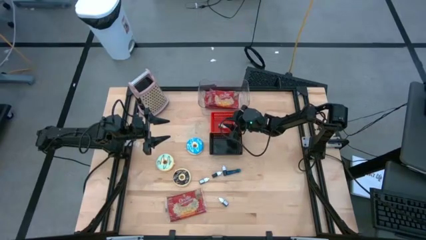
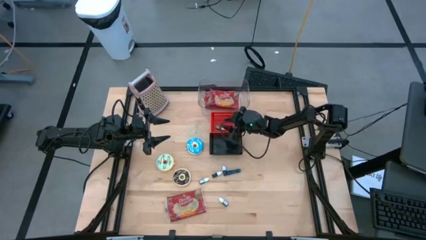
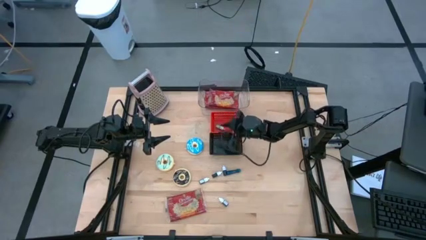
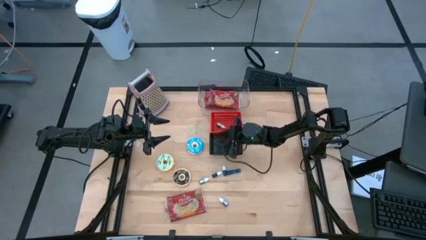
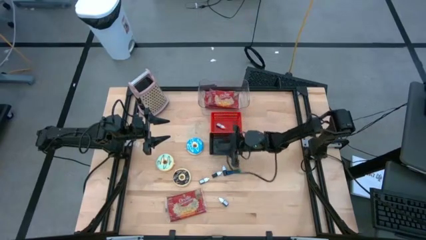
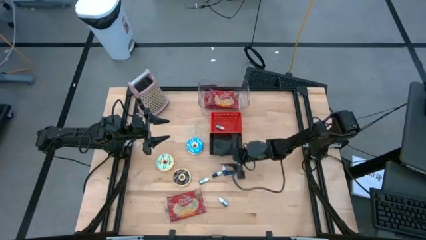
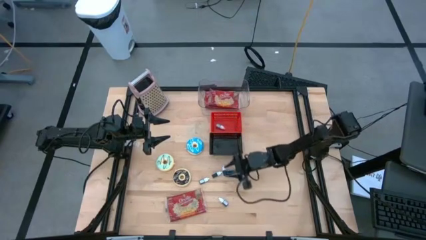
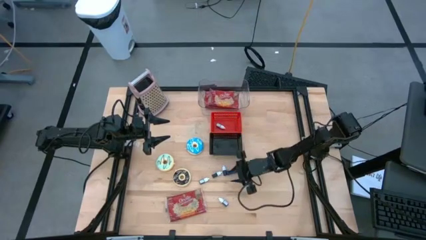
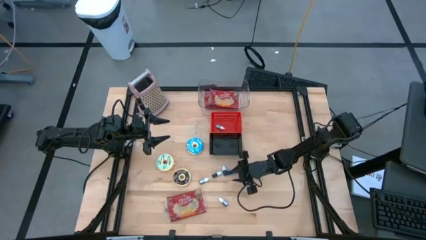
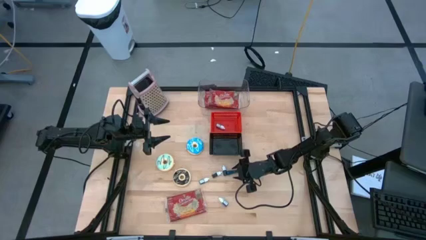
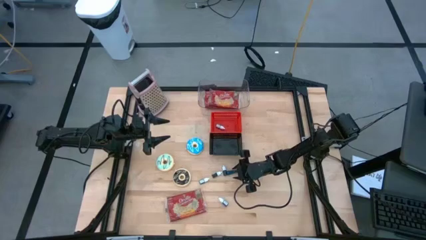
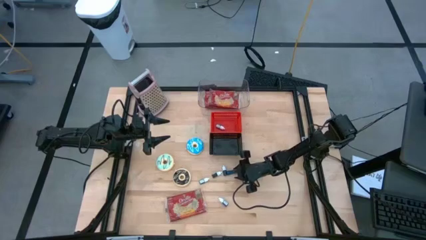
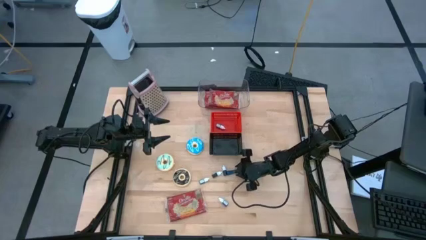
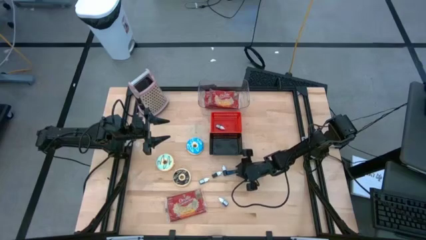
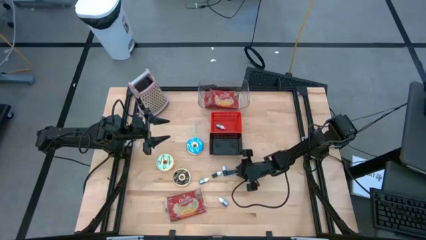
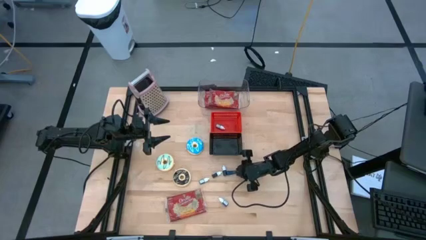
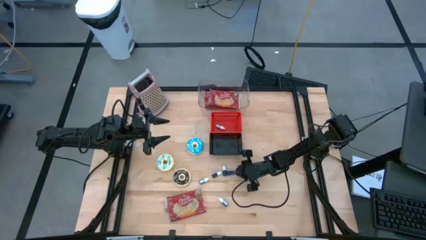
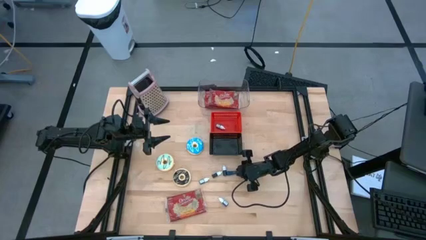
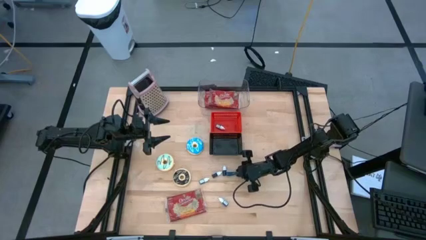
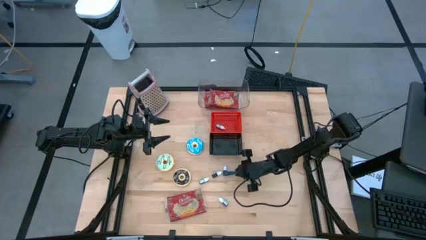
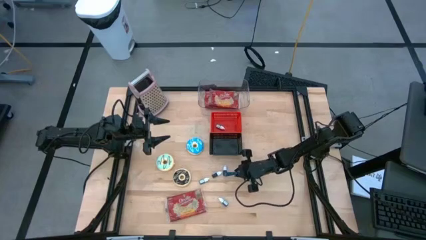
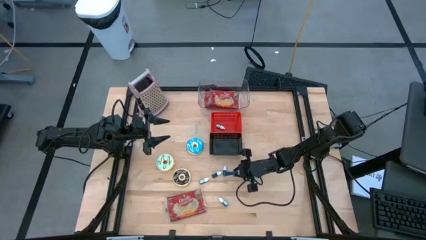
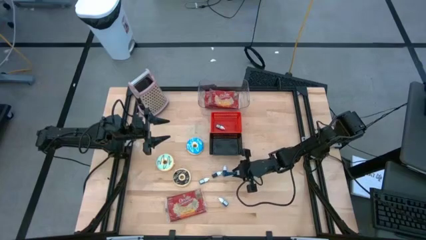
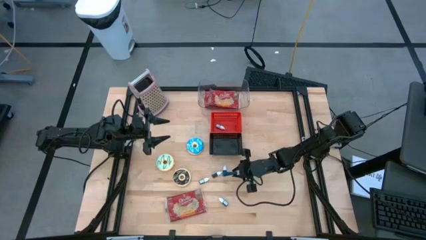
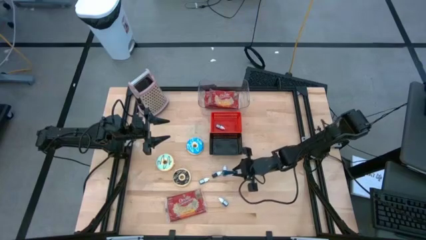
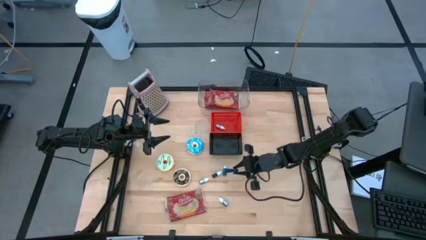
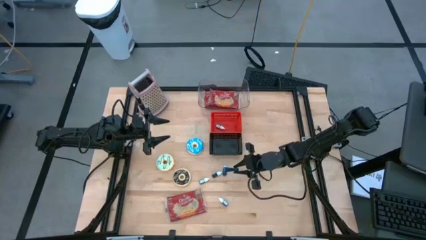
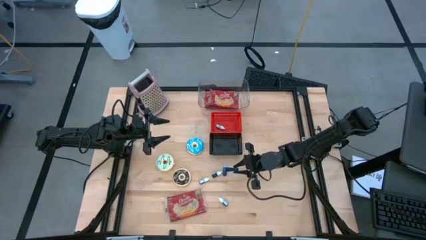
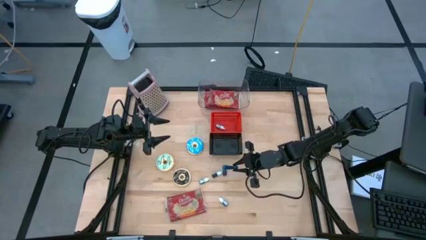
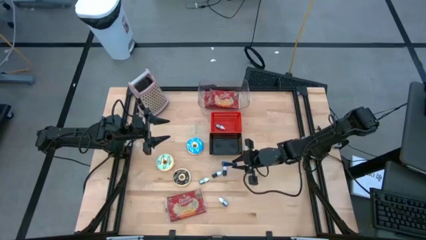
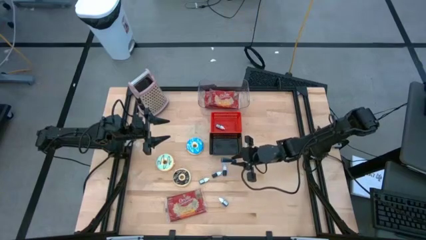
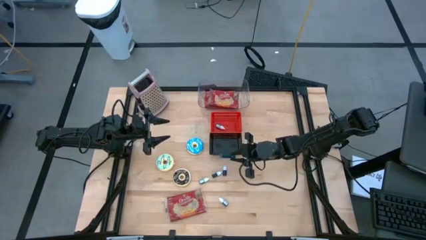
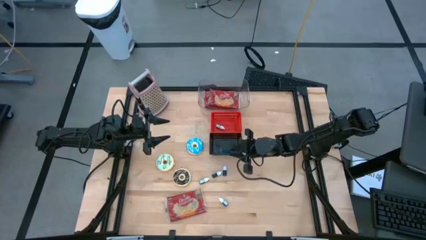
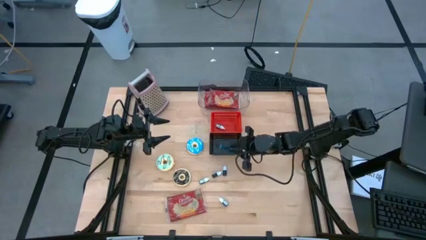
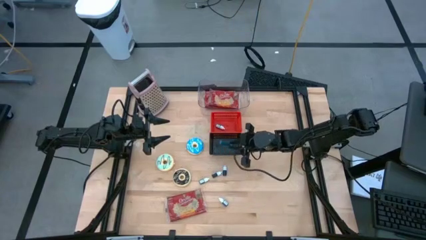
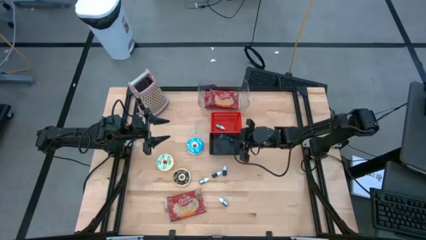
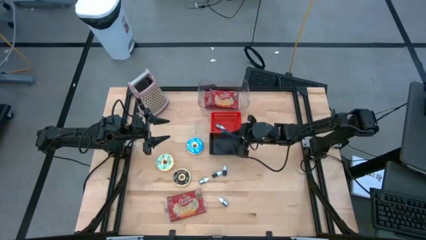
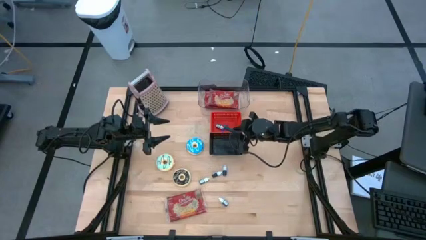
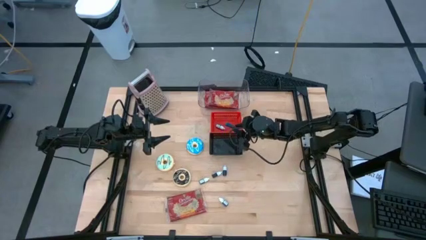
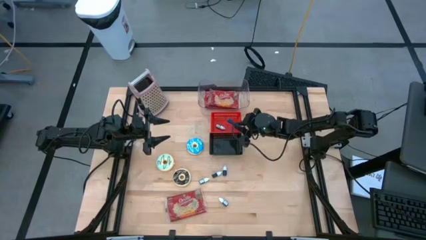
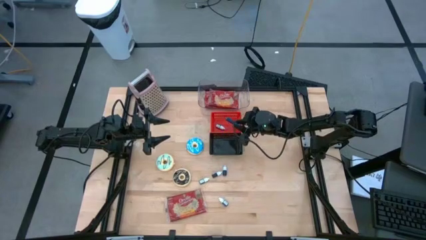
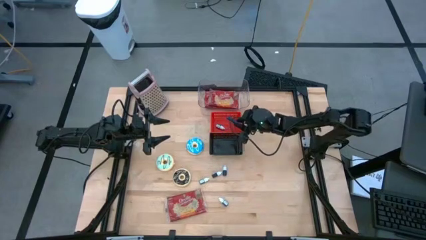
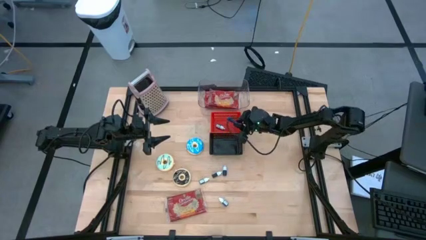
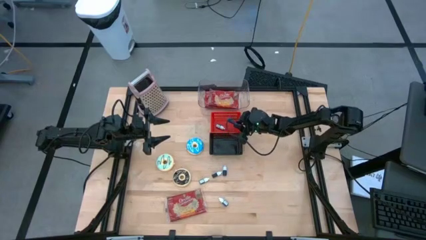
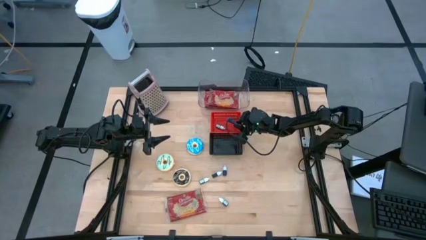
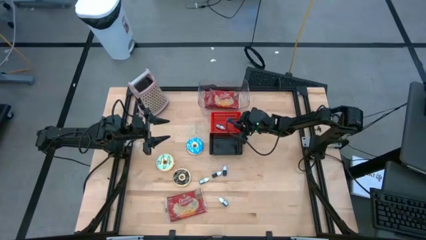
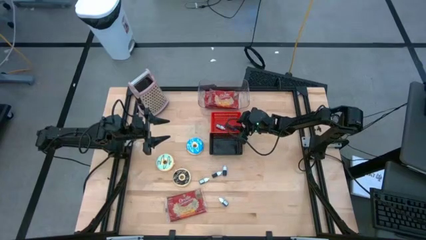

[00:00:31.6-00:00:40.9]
Put the top dark blue food coloring into the red bin

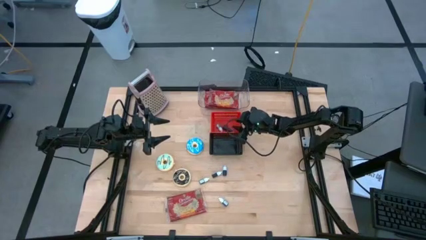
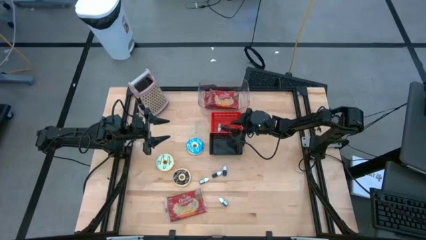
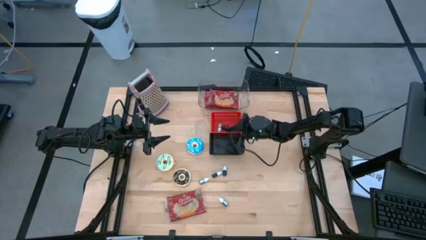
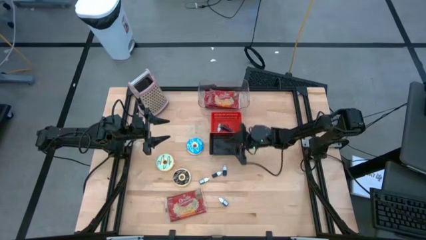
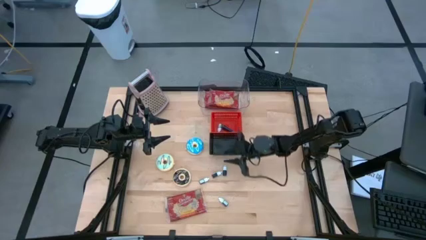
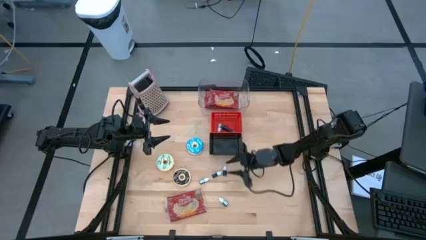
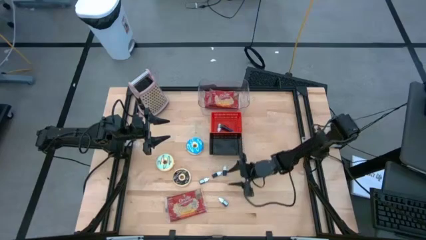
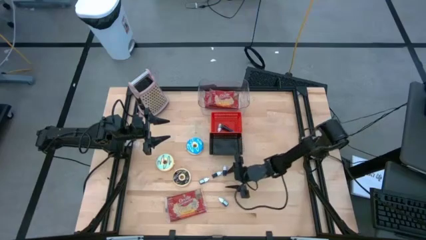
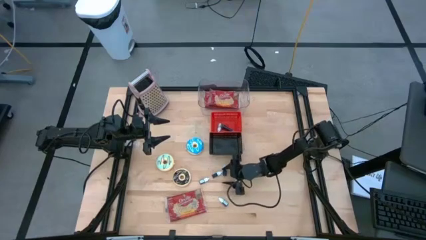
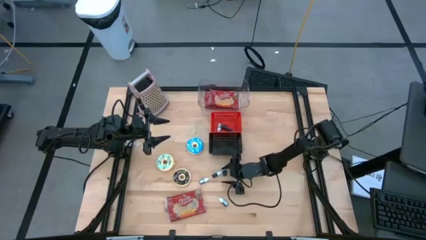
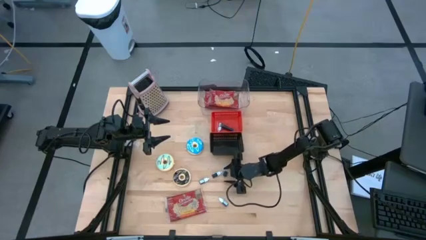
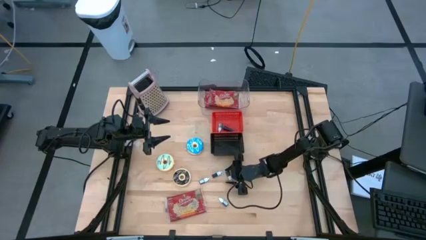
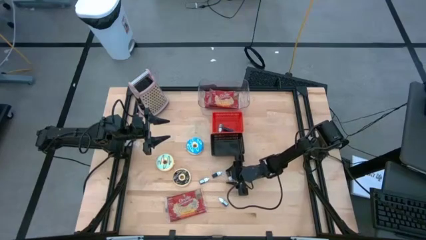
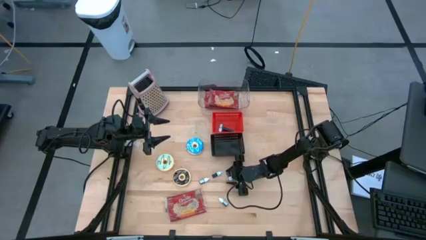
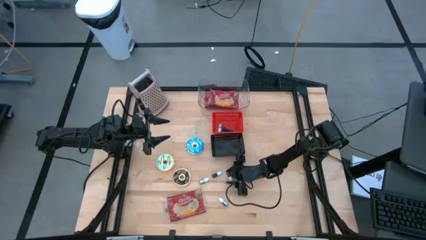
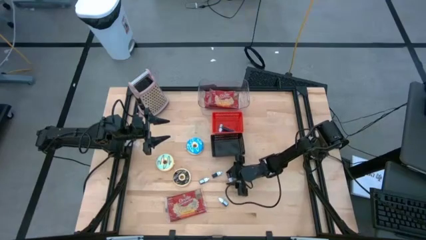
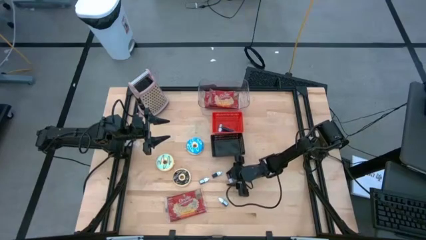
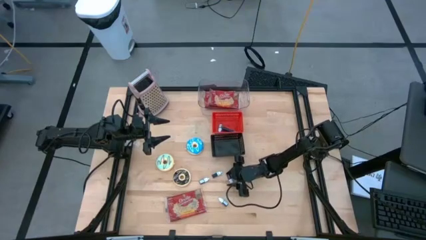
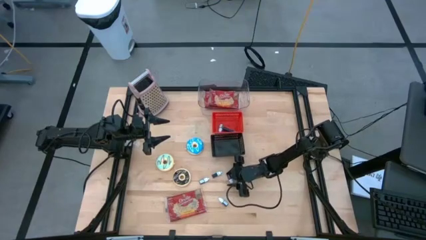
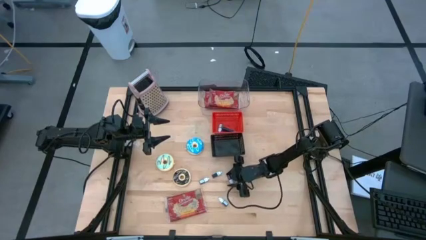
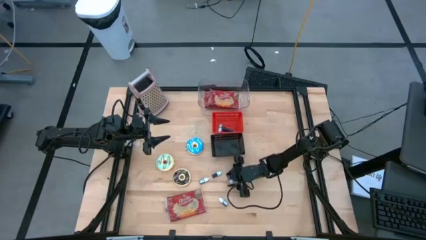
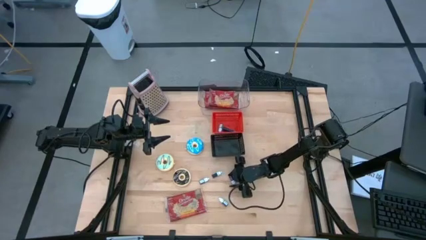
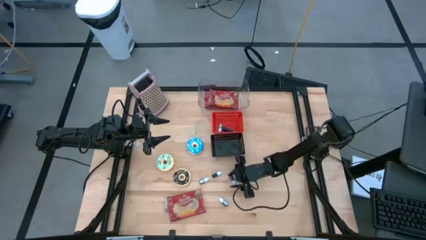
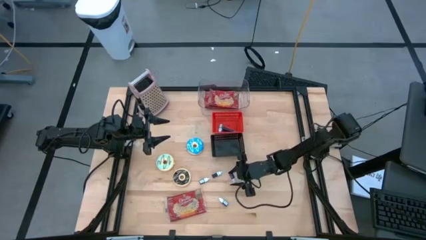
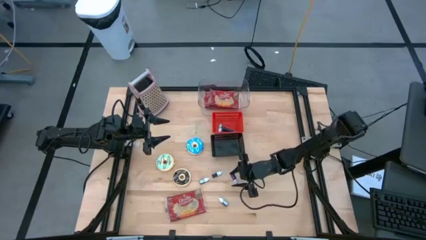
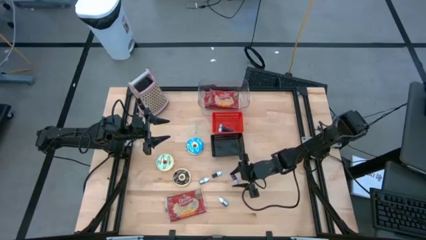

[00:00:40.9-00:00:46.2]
Put the violet food coloring into the red bin
